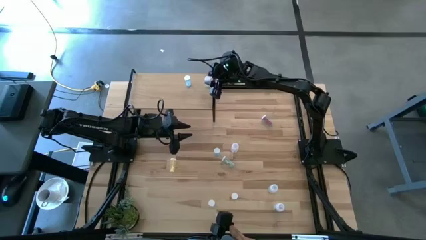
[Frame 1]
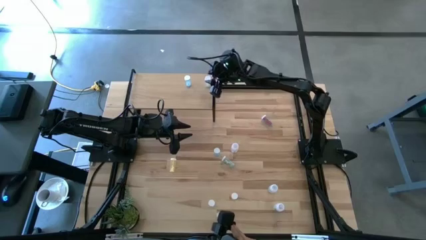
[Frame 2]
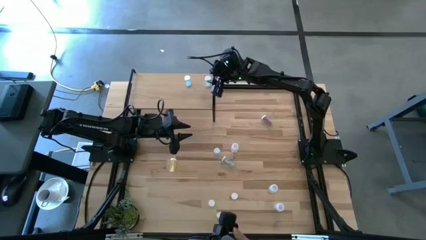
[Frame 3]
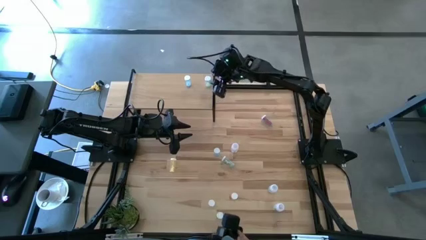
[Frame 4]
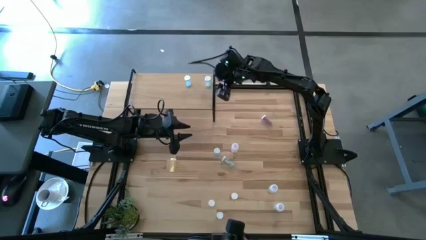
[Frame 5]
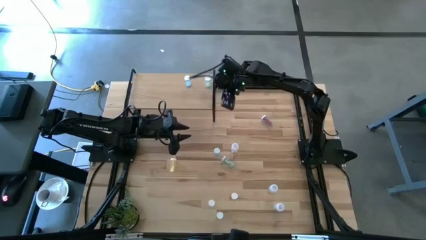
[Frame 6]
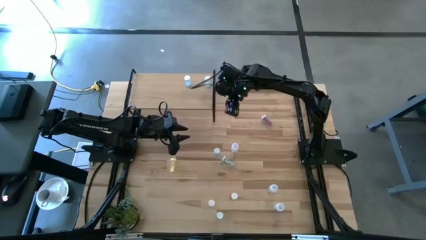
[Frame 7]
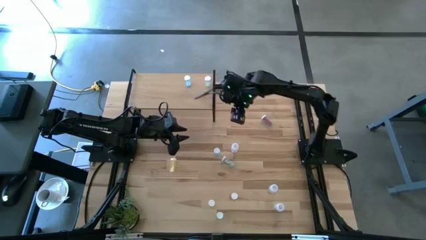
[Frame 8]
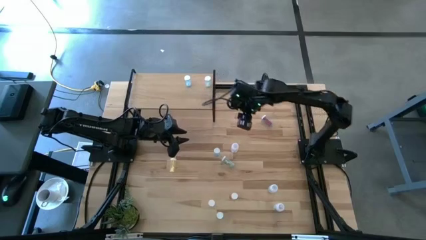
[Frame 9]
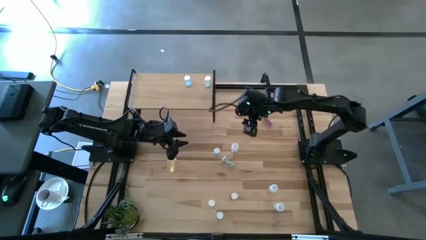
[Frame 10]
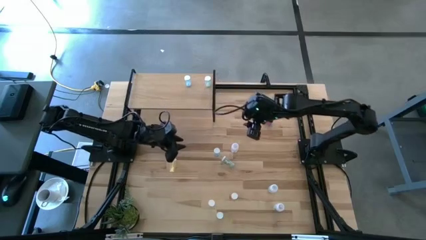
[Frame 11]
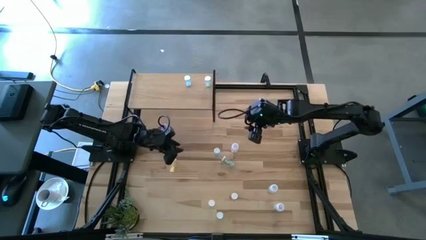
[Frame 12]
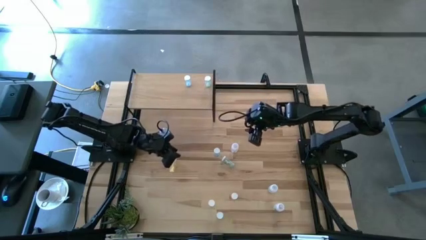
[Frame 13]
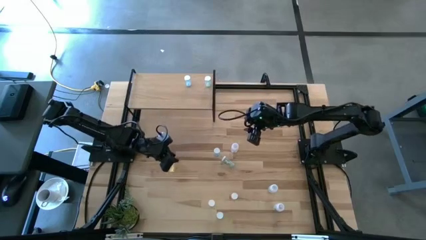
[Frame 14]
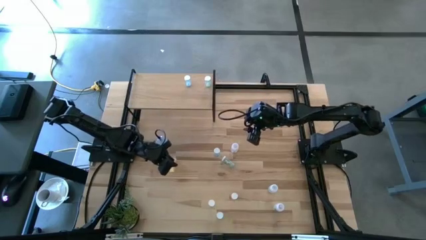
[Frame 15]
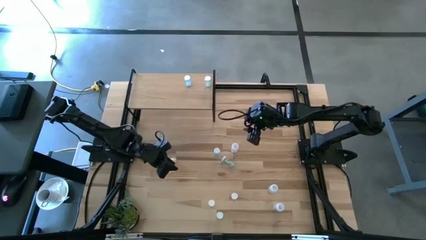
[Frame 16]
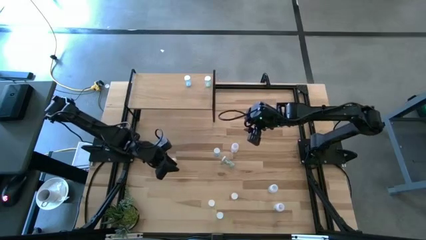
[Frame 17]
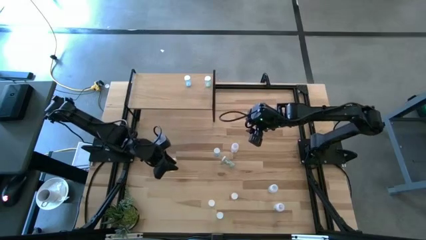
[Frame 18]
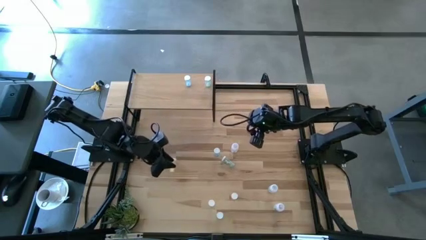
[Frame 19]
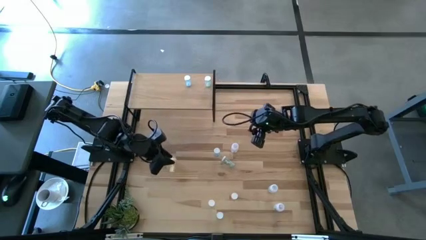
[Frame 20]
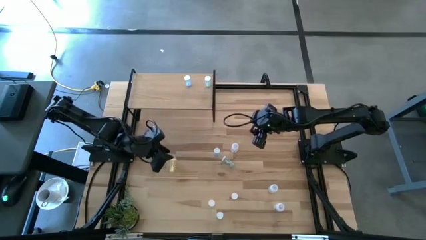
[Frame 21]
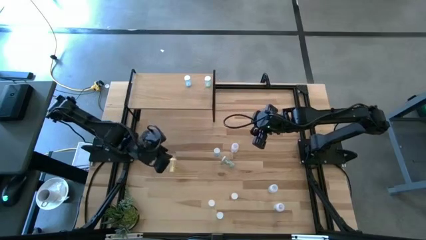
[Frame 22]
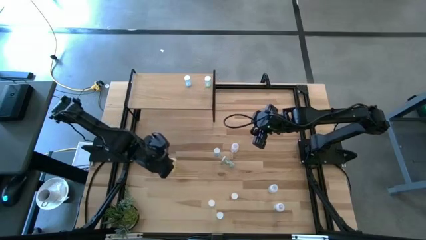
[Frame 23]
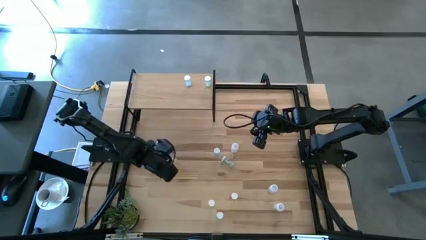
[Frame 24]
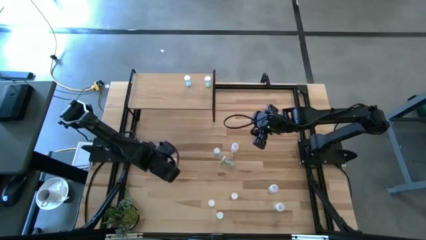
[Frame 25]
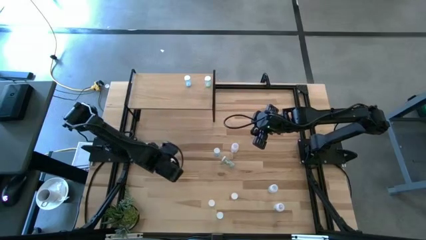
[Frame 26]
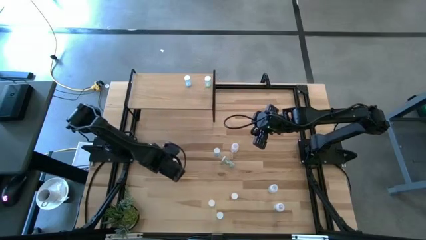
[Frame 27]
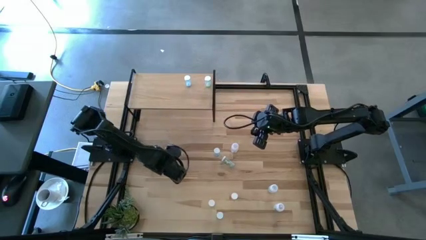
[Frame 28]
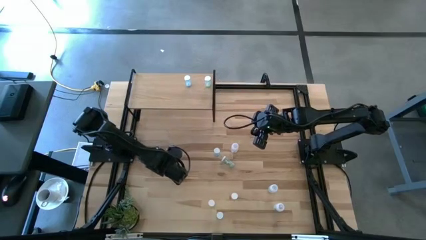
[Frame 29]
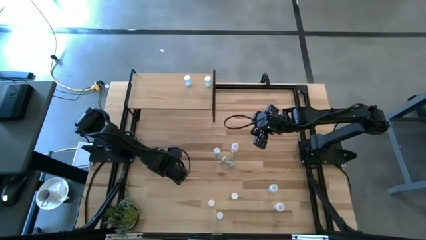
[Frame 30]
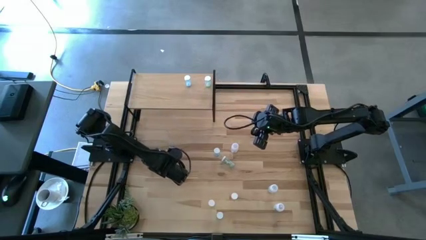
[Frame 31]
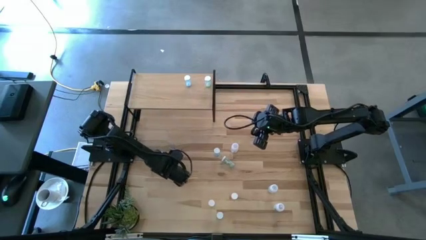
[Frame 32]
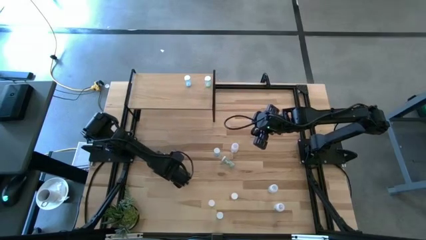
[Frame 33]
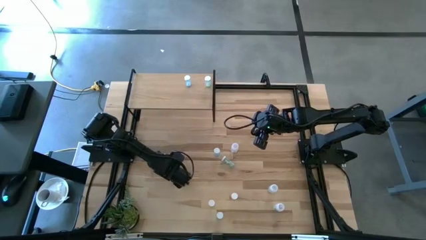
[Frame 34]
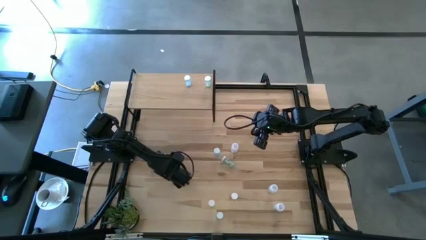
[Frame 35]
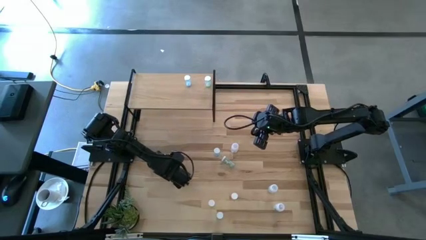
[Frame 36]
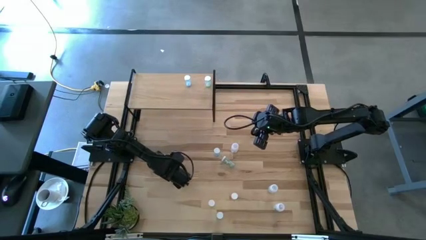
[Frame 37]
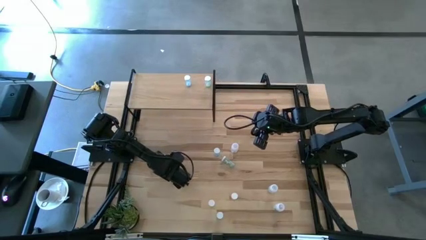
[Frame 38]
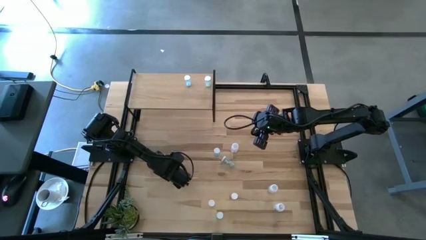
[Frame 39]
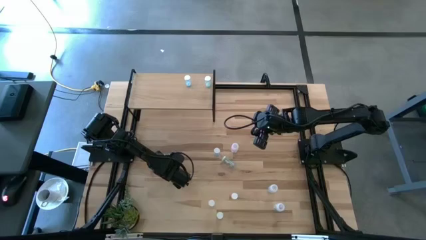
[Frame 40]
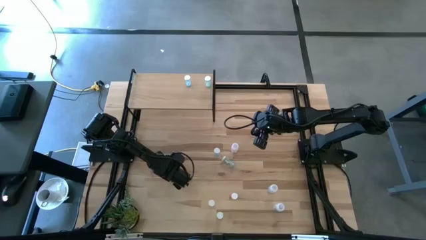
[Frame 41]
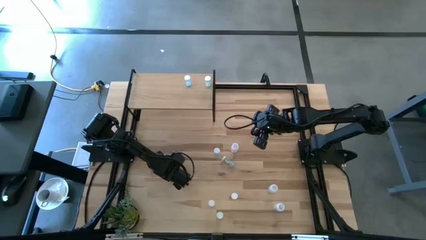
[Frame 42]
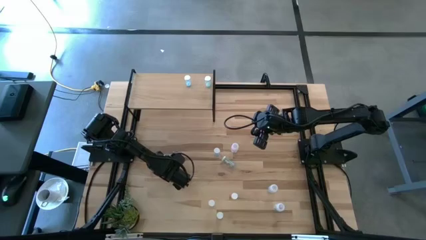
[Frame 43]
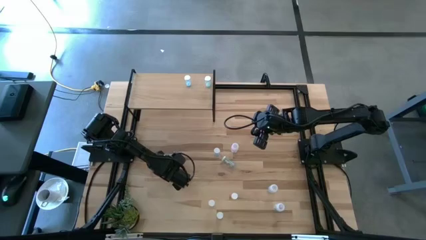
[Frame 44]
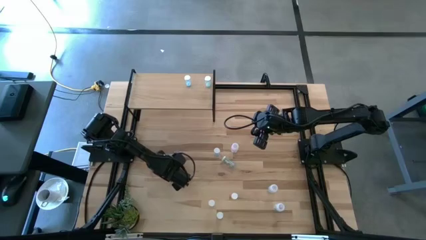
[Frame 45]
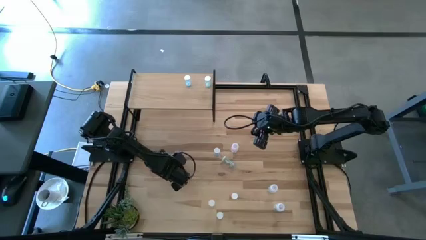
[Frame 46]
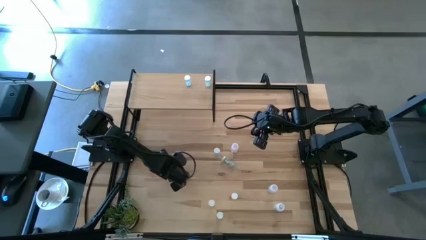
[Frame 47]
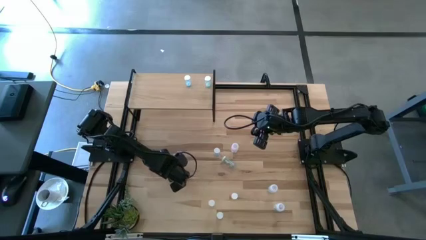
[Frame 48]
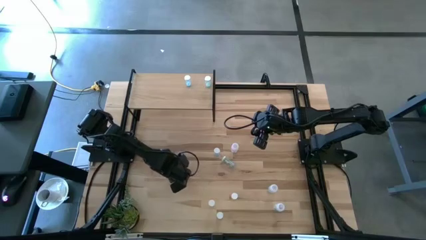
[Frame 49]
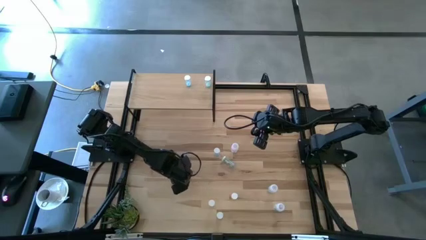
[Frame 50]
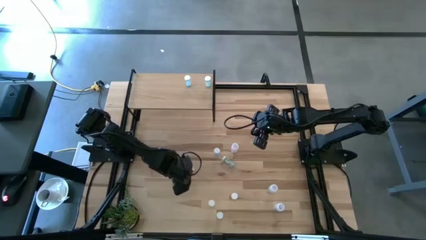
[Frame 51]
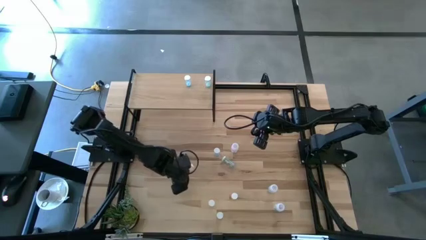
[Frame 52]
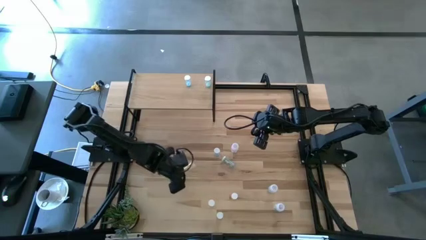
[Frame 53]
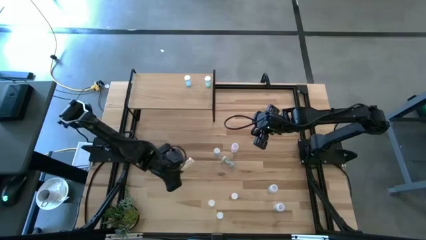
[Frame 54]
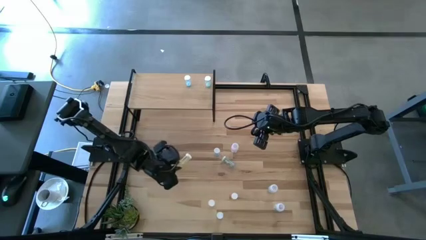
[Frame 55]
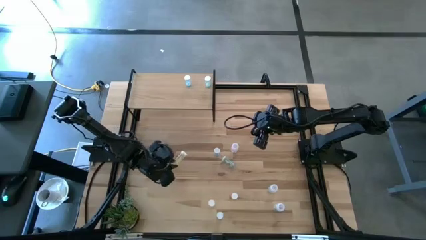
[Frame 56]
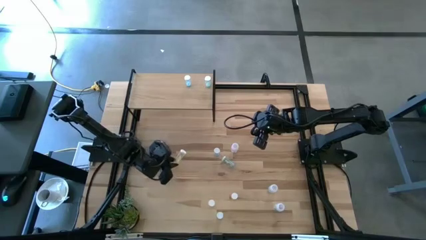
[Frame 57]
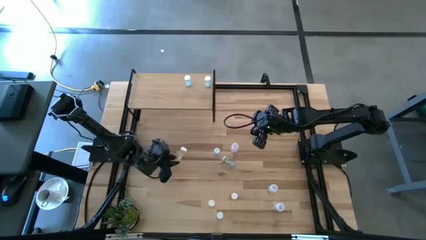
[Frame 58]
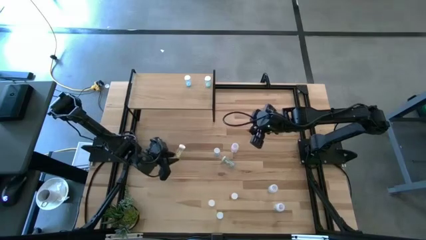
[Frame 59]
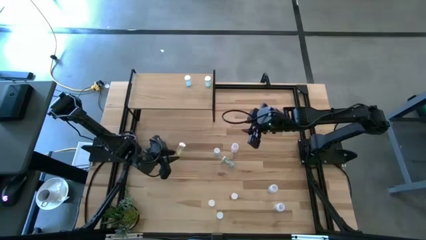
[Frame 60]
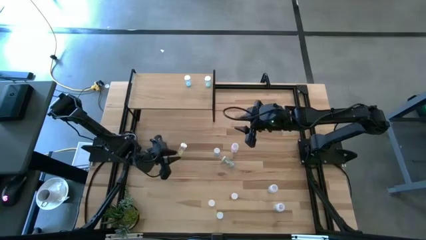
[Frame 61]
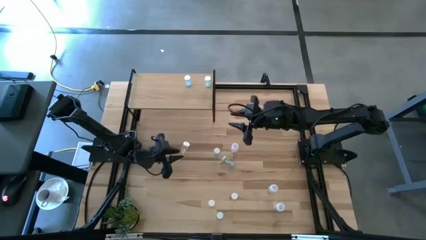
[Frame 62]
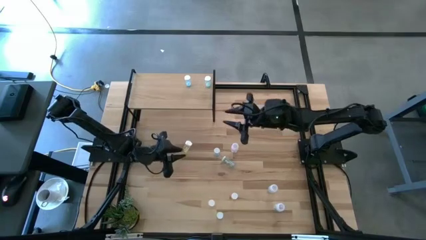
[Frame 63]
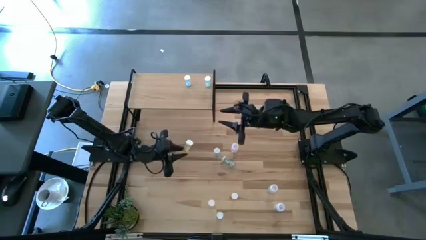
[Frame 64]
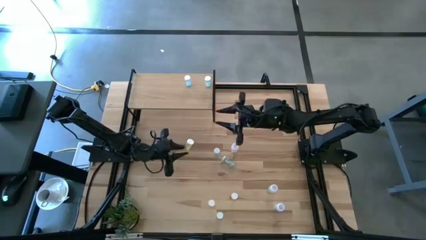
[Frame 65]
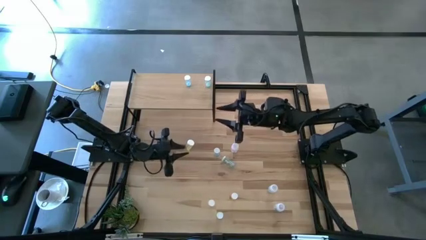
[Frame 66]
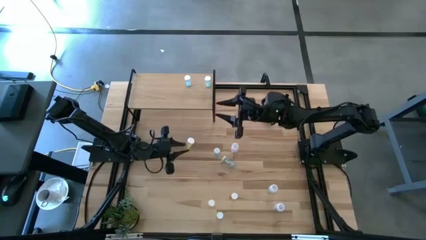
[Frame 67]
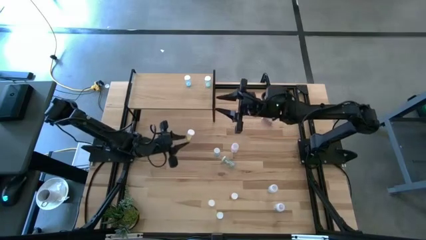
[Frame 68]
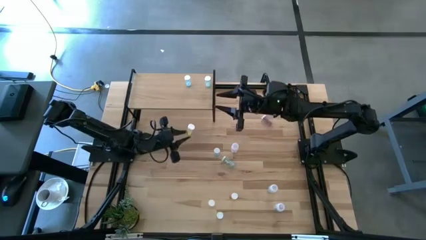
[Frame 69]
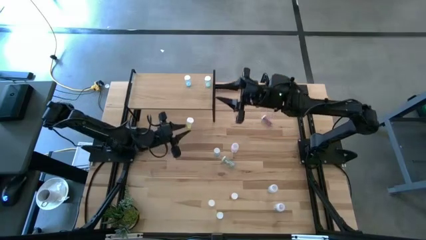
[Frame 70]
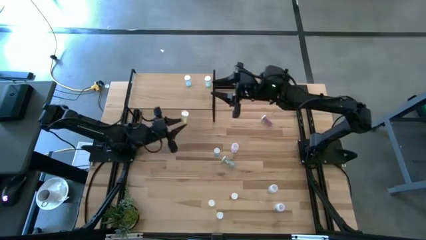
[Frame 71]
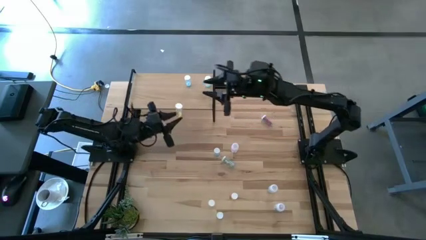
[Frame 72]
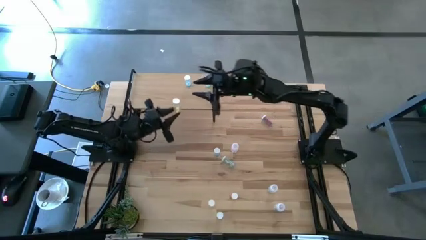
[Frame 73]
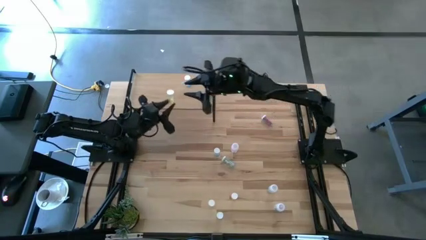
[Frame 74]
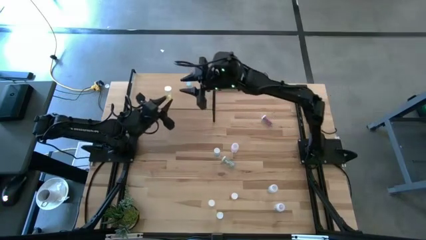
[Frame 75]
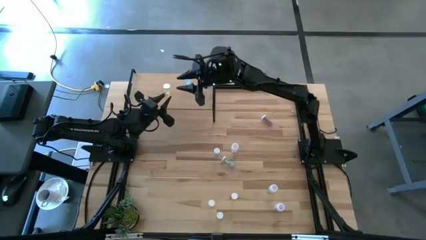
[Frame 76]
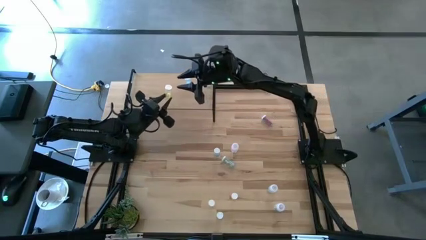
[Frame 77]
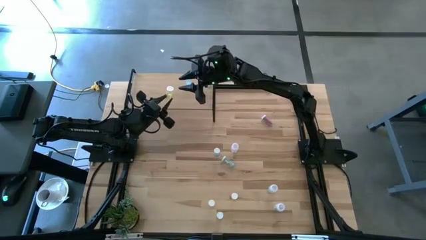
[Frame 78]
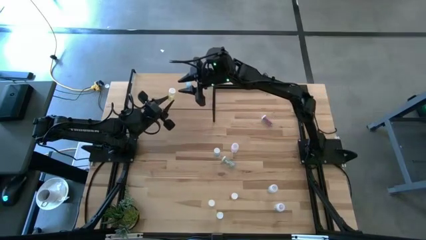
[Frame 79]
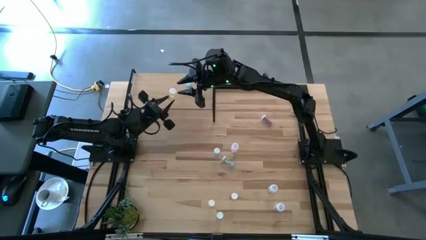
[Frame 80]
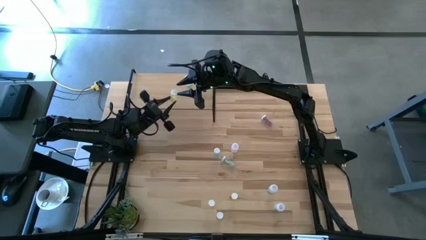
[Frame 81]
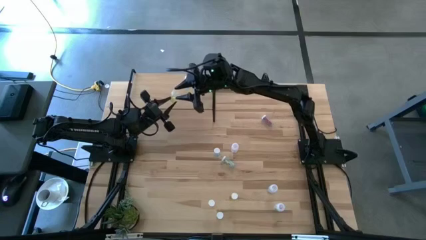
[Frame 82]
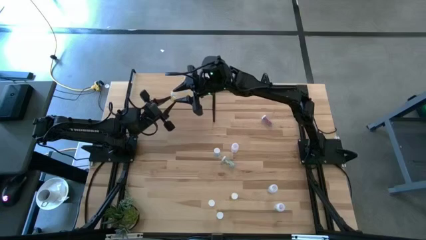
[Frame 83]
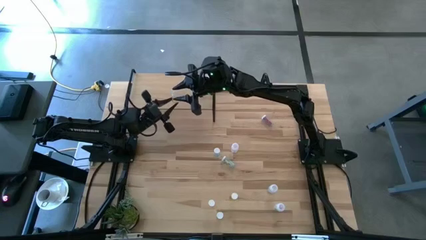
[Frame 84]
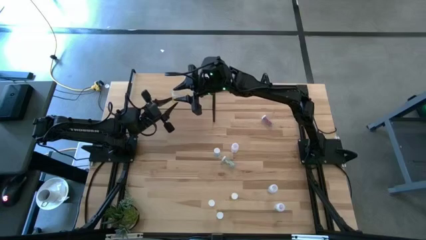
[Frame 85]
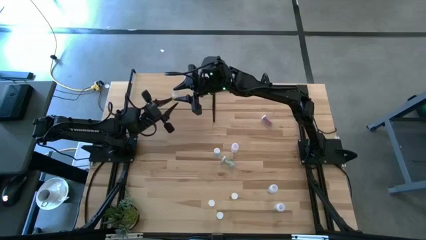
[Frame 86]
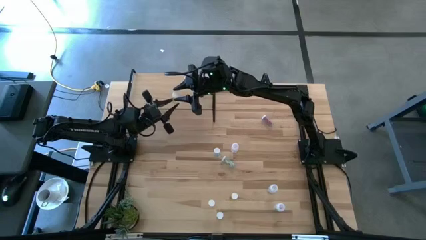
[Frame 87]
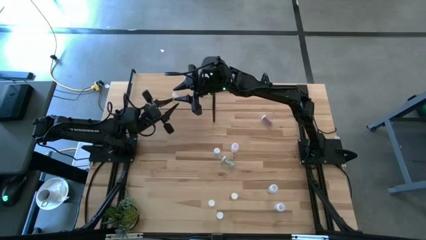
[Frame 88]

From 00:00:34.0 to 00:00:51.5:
Task: Pick and place medicine bottles onto shelf by color
Put the top right yellow pill bottle on the shelf
